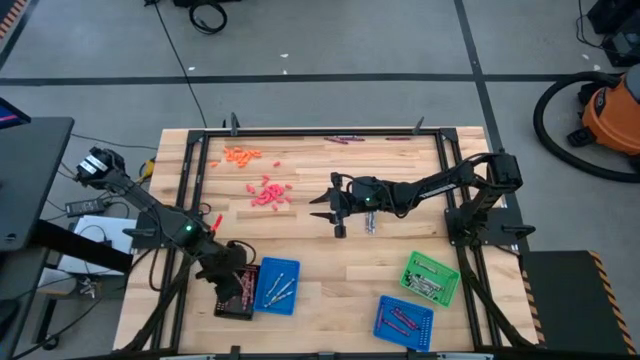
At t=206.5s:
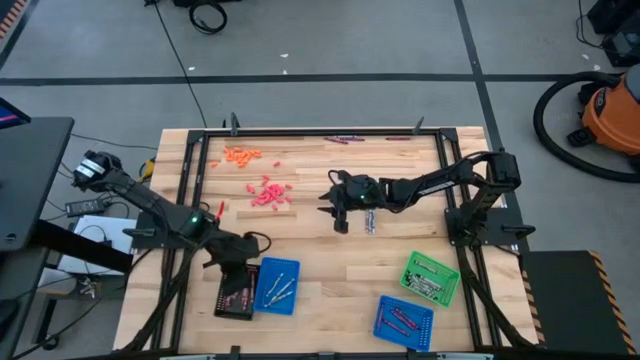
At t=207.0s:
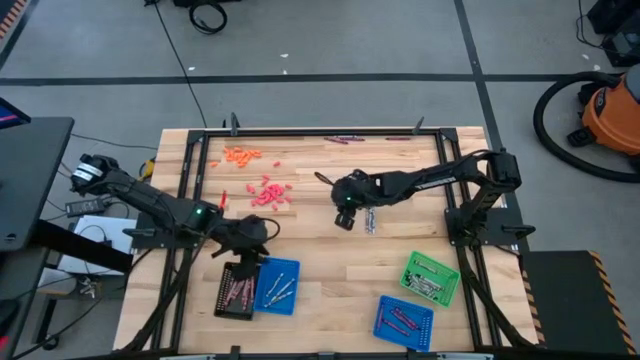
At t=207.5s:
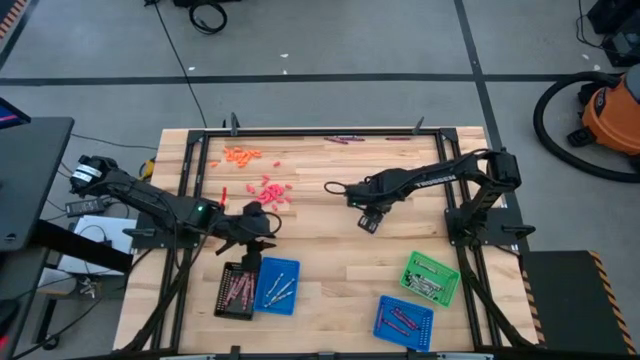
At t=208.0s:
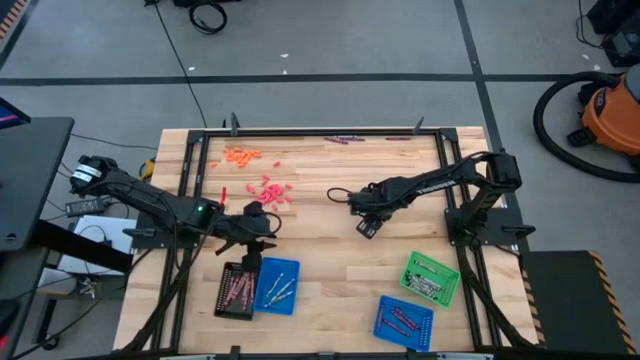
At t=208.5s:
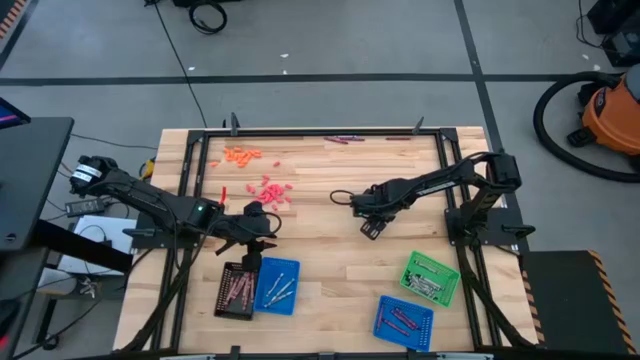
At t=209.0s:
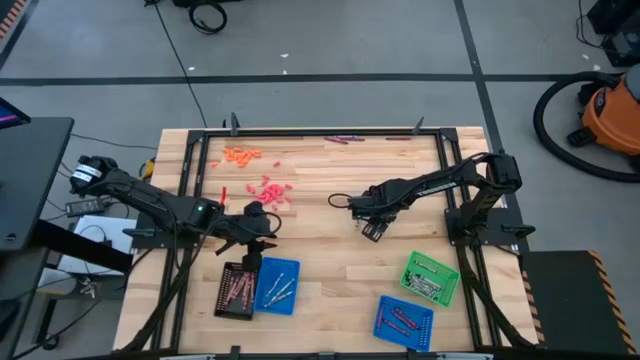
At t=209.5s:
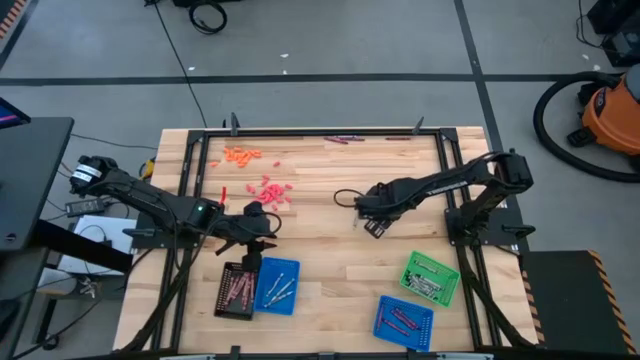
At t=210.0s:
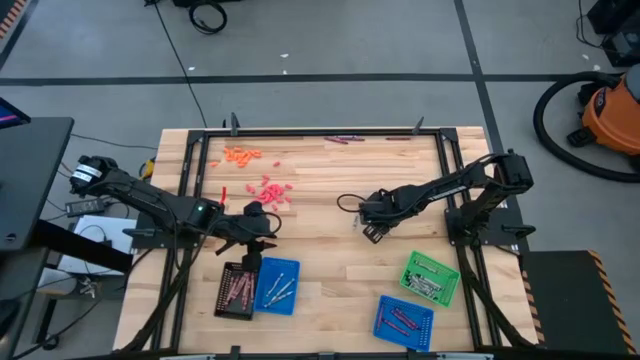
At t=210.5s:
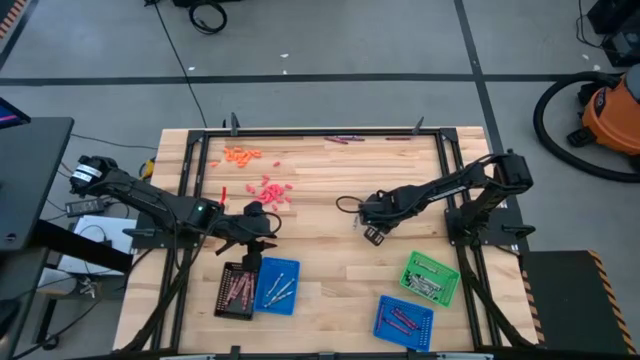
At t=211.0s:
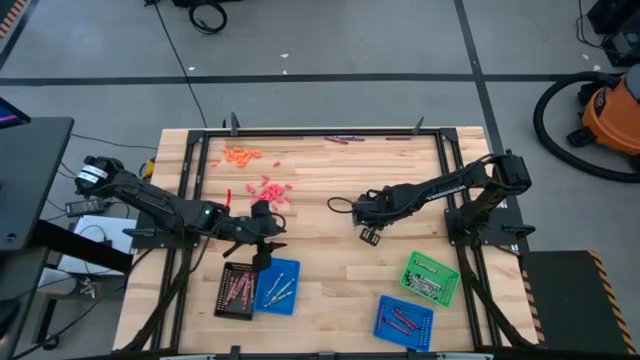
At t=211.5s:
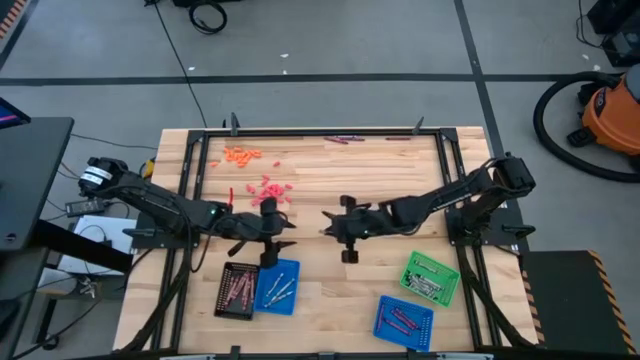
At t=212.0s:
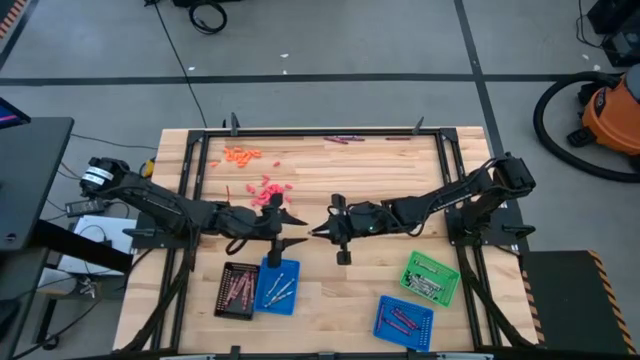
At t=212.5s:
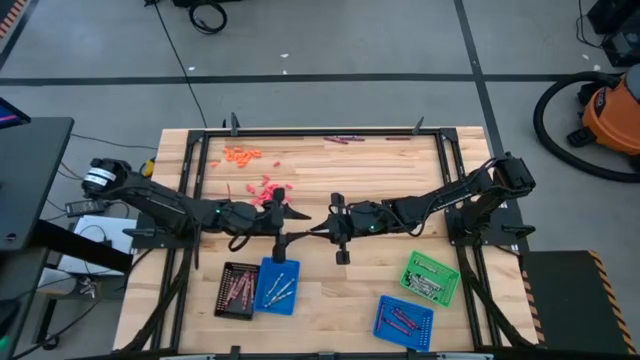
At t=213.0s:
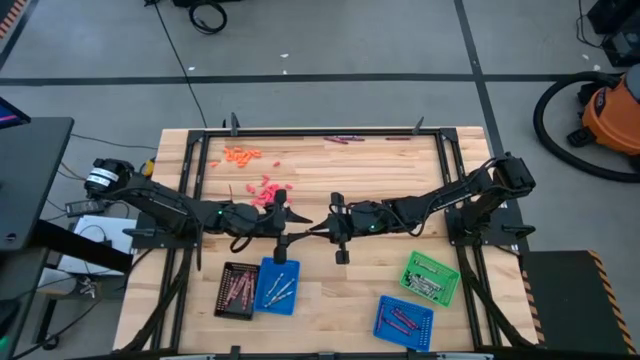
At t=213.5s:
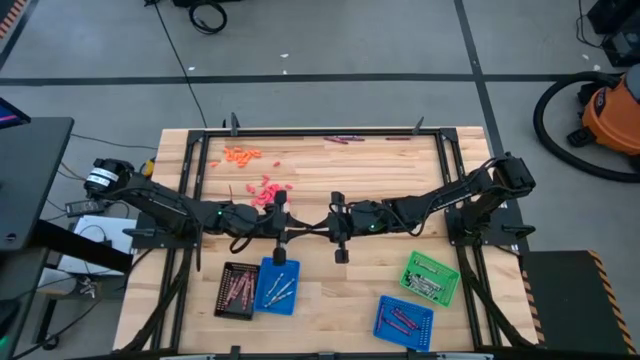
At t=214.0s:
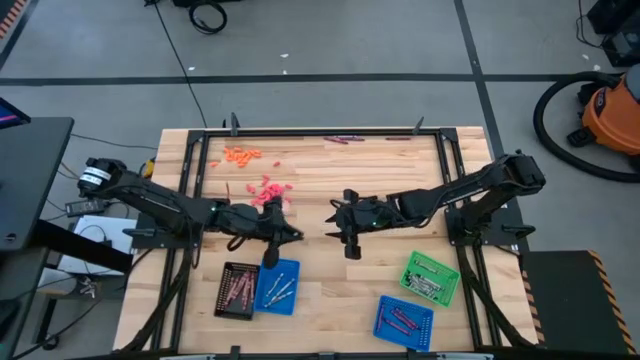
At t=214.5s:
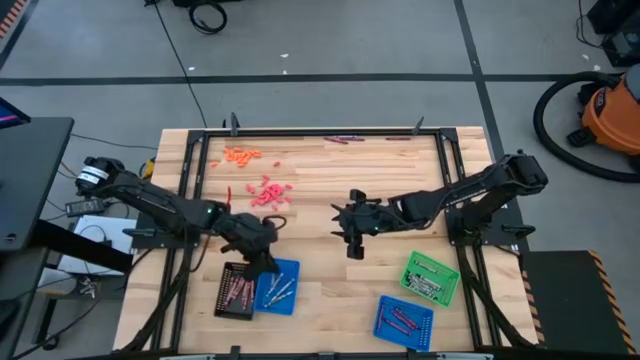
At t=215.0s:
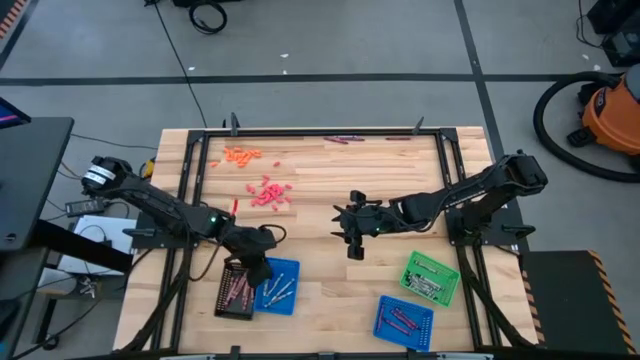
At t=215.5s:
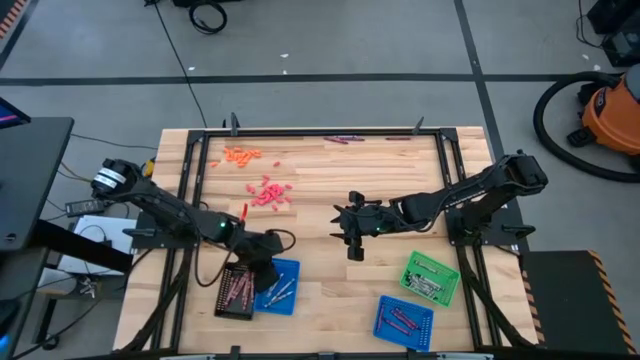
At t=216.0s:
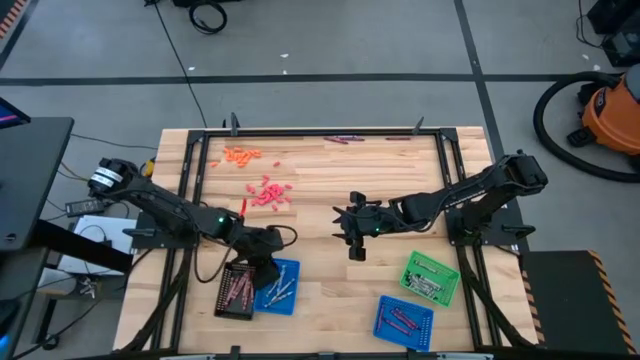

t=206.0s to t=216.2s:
Task: Sort crayons
Put the white crayon into the left blue bin

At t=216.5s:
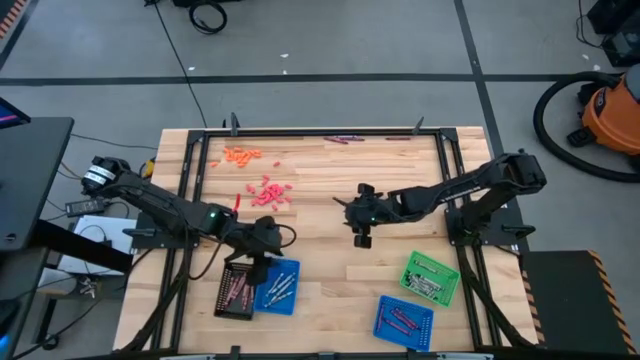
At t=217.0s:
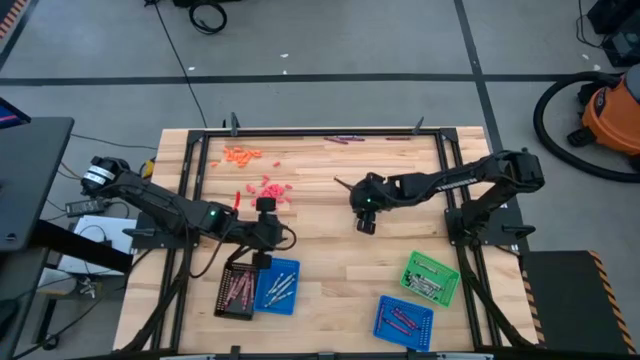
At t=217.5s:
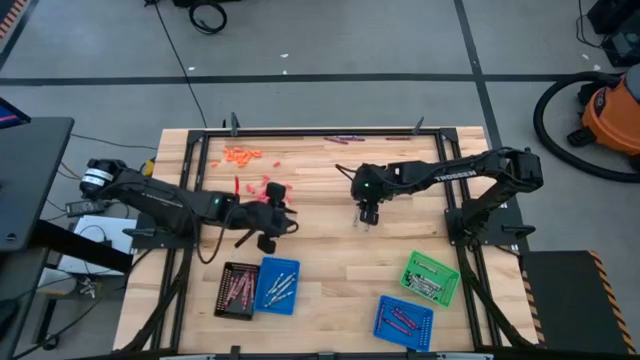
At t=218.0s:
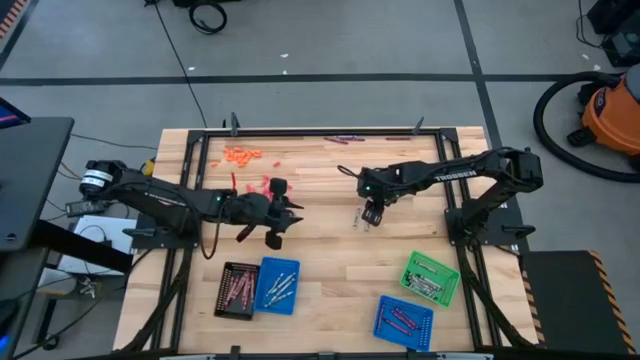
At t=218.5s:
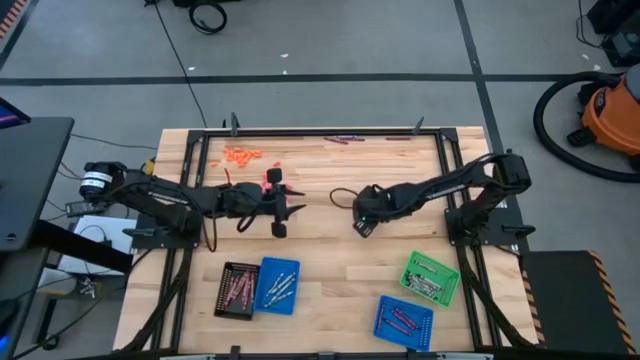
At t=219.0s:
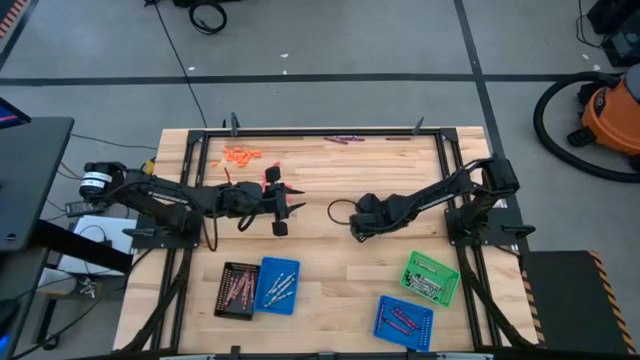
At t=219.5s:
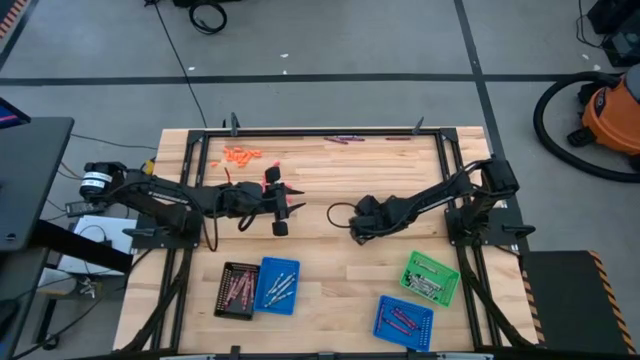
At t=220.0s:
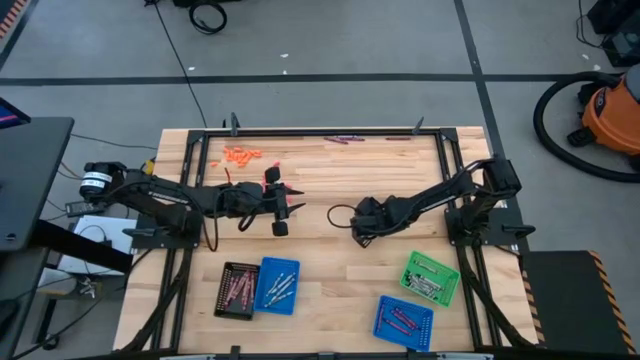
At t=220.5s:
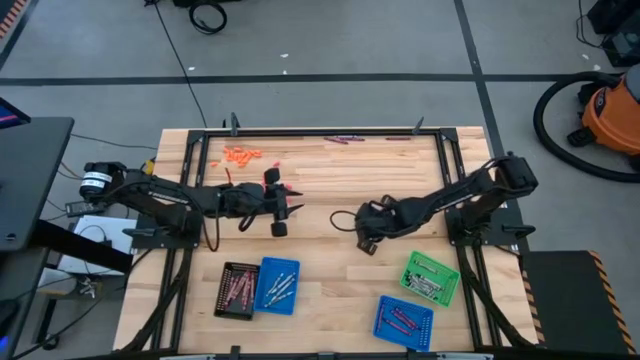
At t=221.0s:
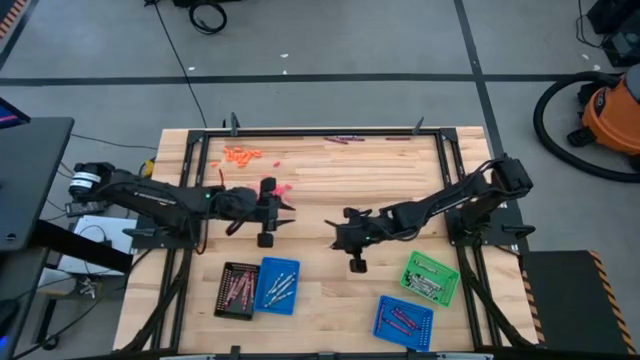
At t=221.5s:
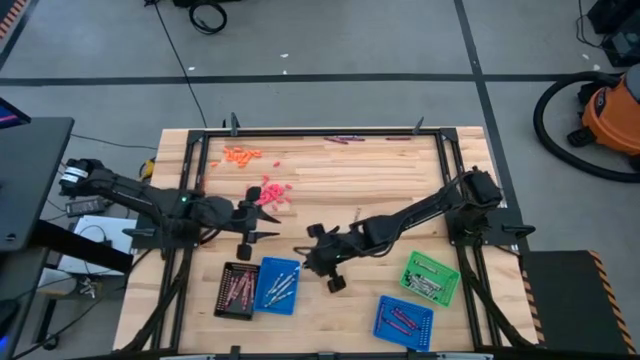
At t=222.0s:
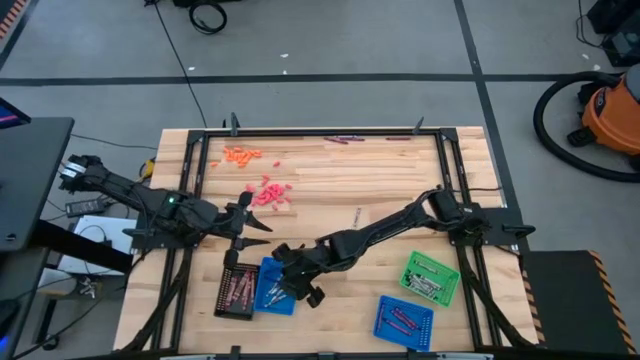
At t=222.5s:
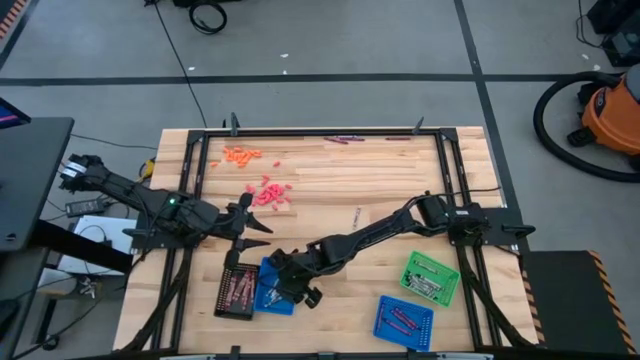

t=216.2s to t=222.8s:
Put the white crayon into the left blue bin

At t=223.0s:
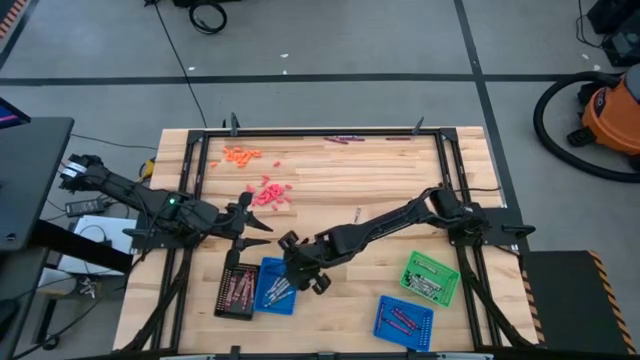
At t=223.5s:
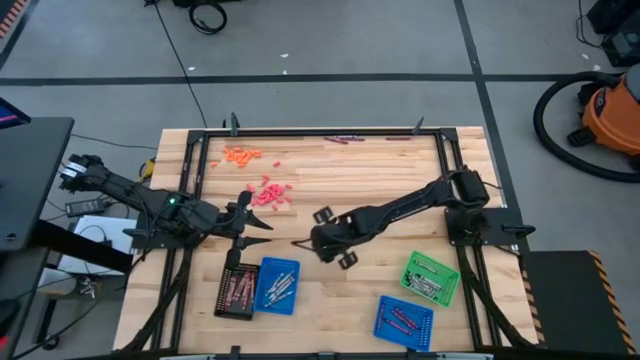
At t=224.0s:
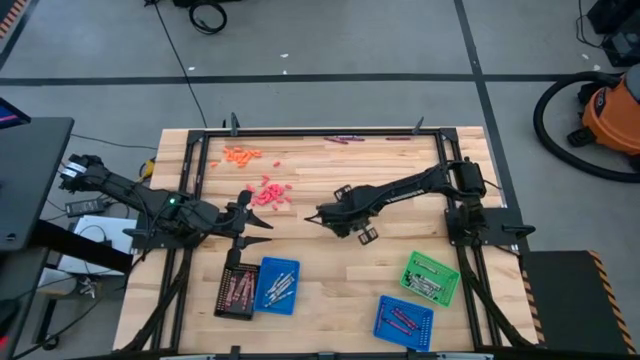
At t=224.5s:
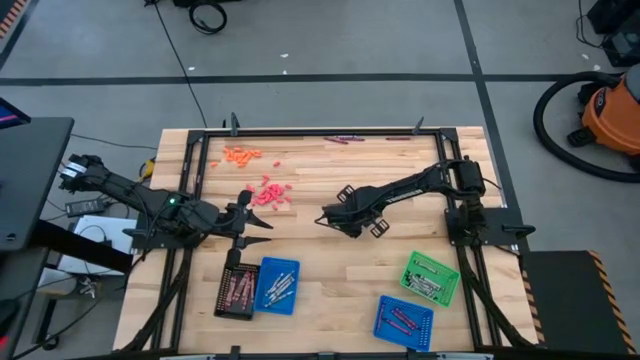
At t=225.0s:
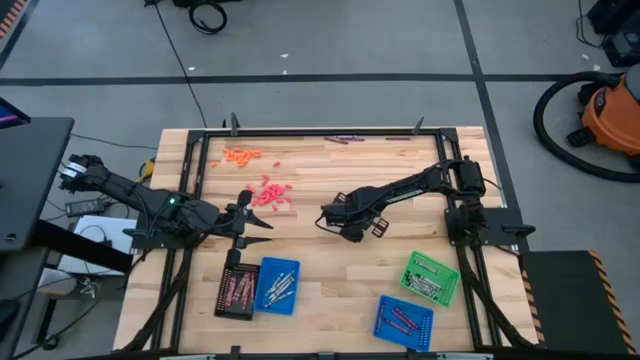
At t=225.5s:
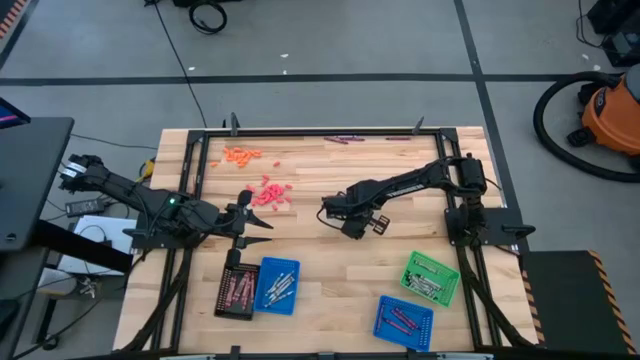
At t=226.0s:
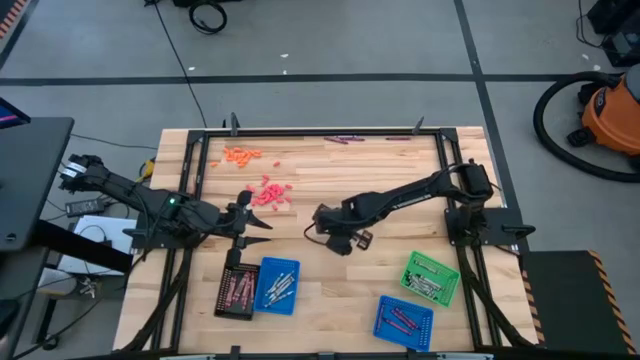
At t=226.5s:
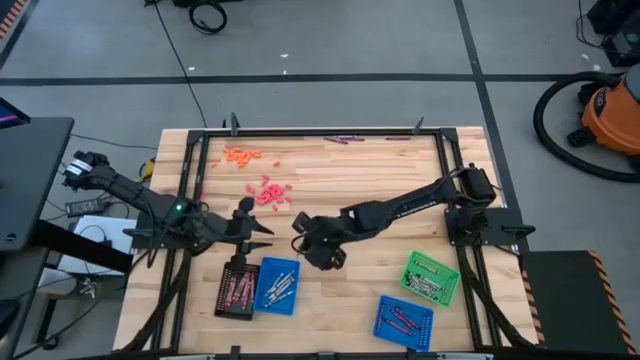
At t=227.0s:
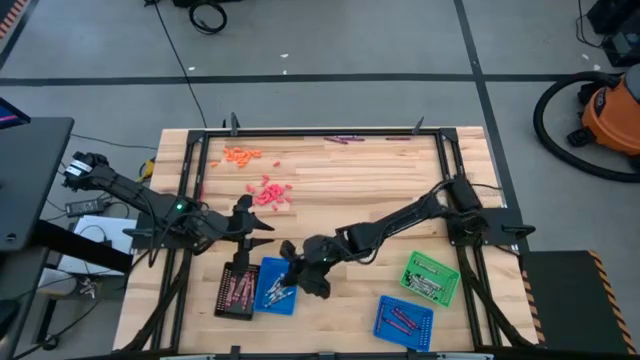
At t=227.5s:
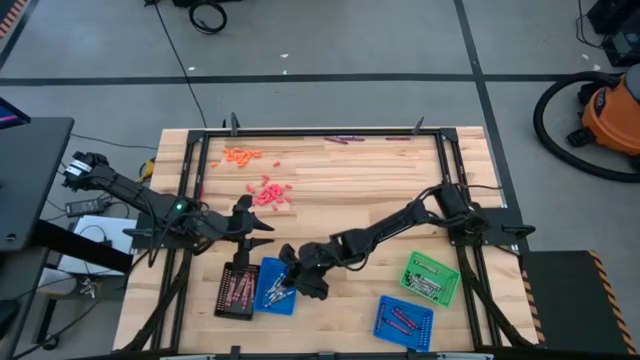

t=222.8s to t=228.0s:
Put the white crayon into the left blue bin
